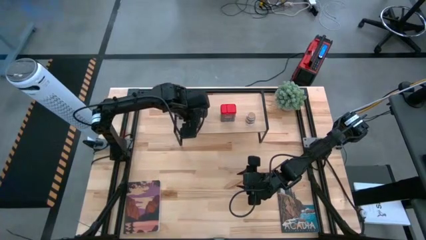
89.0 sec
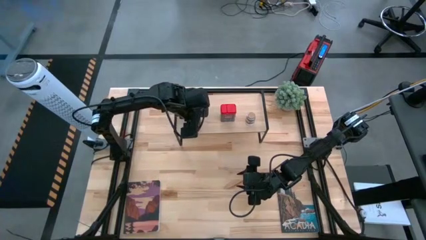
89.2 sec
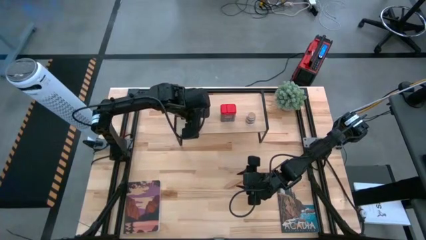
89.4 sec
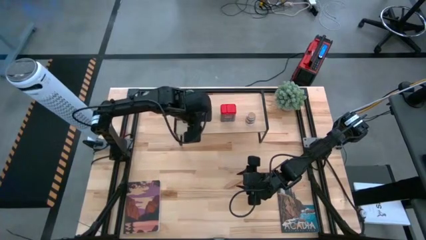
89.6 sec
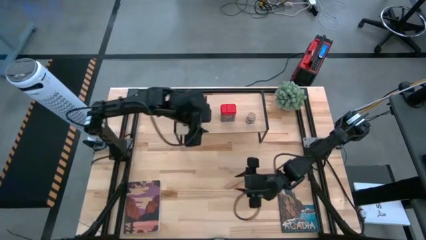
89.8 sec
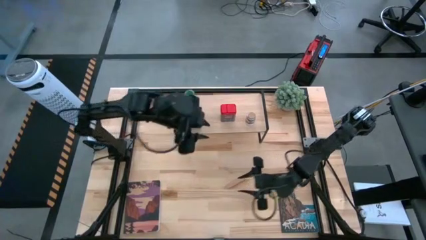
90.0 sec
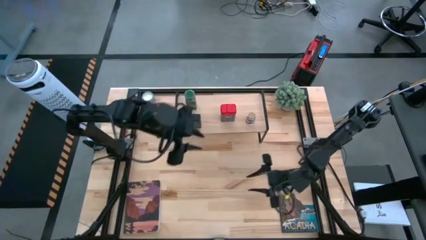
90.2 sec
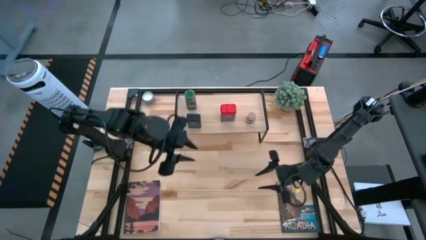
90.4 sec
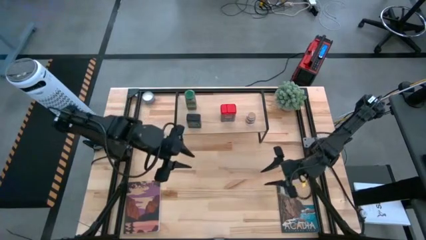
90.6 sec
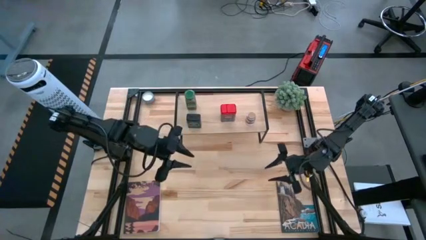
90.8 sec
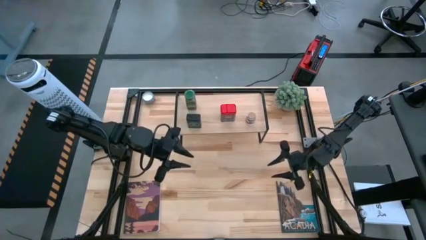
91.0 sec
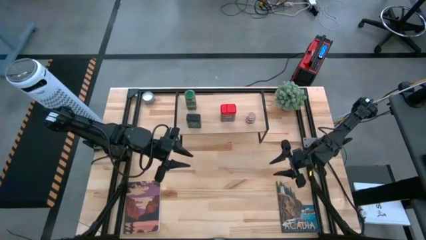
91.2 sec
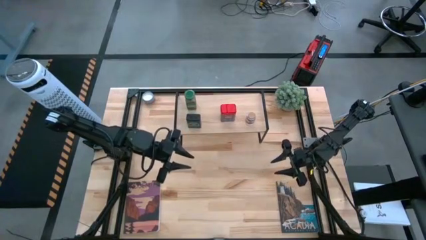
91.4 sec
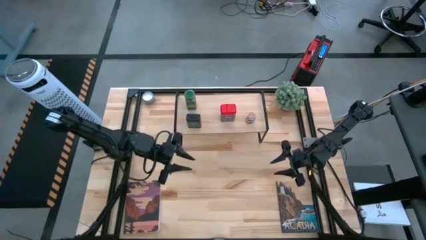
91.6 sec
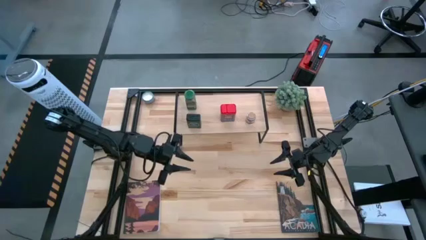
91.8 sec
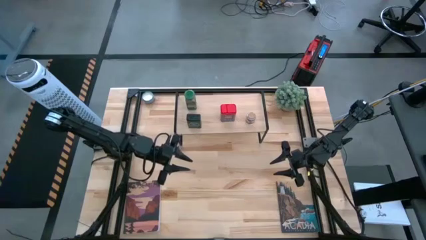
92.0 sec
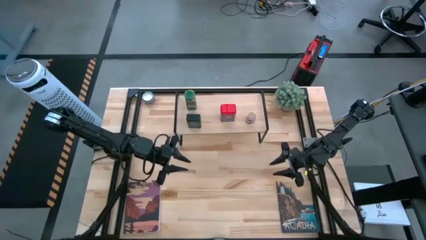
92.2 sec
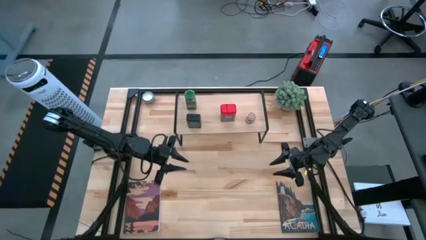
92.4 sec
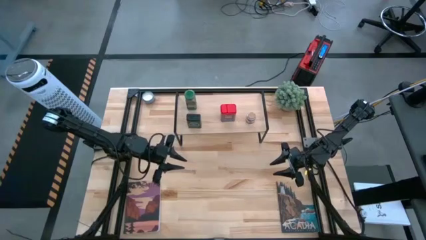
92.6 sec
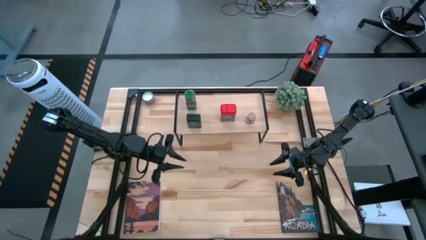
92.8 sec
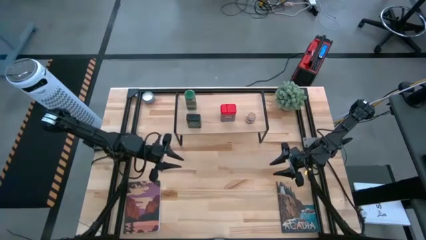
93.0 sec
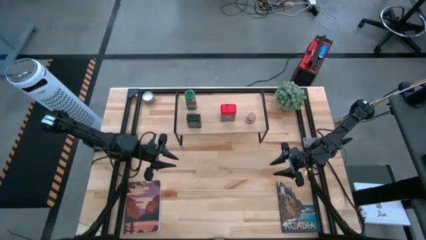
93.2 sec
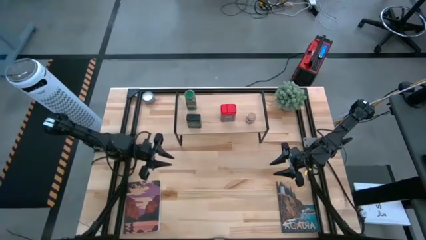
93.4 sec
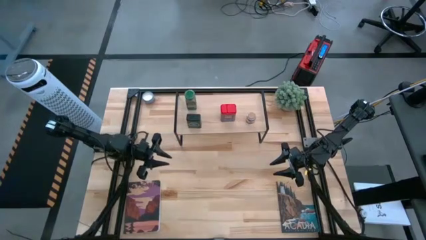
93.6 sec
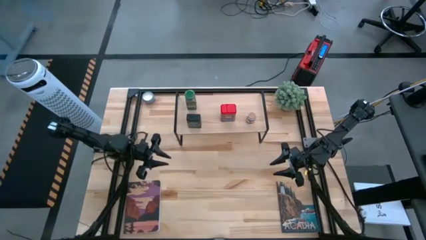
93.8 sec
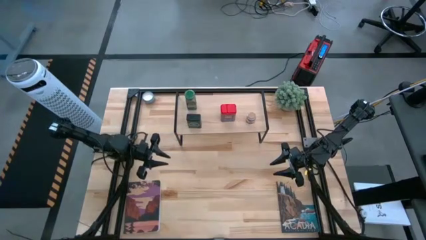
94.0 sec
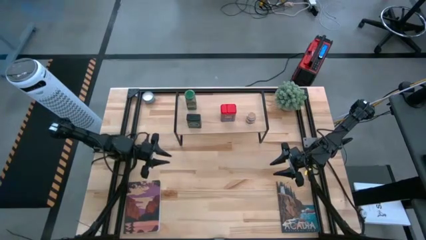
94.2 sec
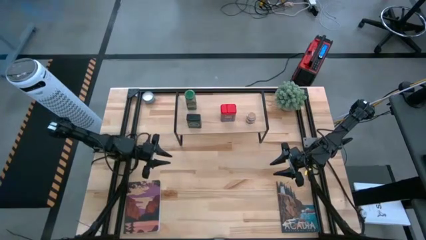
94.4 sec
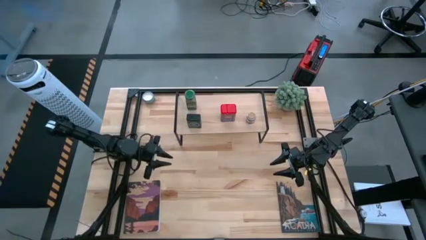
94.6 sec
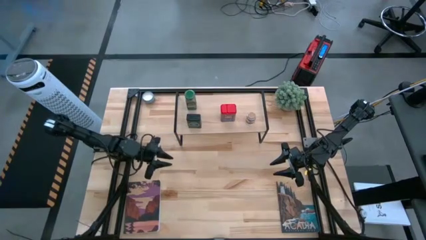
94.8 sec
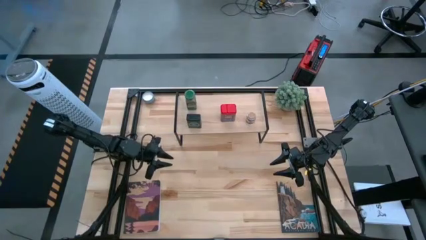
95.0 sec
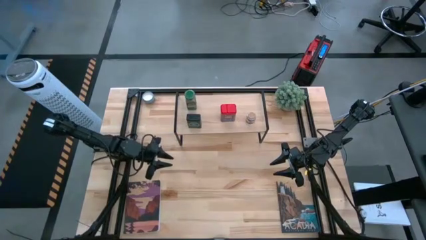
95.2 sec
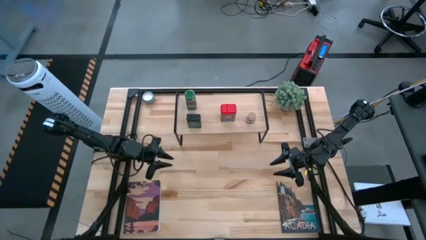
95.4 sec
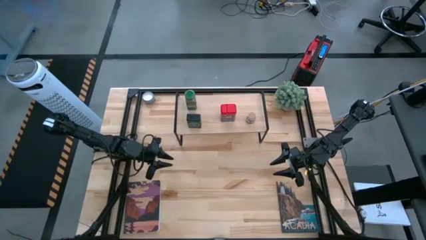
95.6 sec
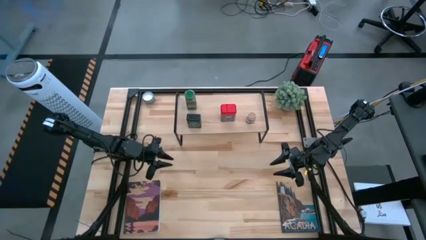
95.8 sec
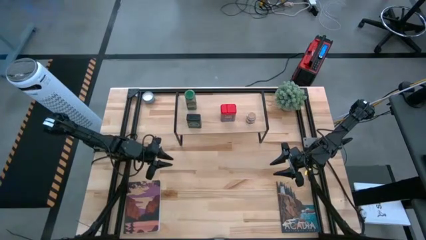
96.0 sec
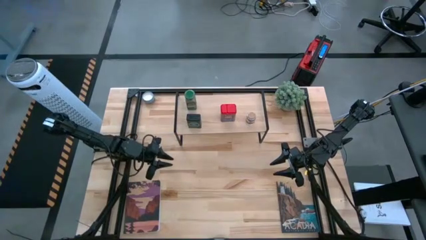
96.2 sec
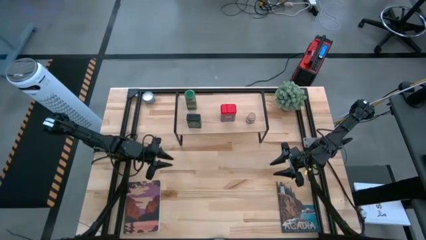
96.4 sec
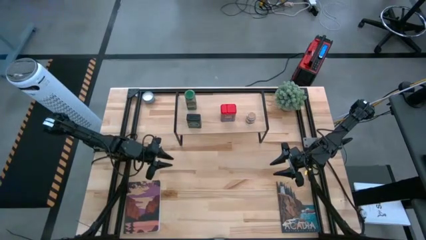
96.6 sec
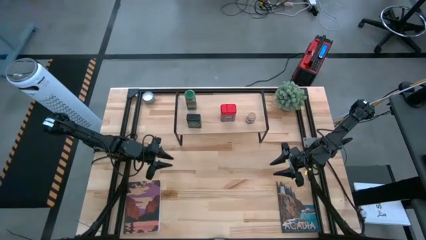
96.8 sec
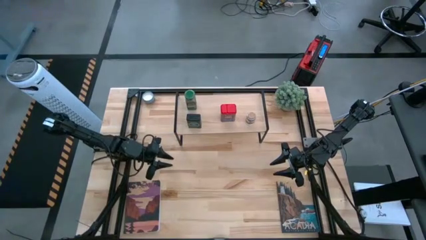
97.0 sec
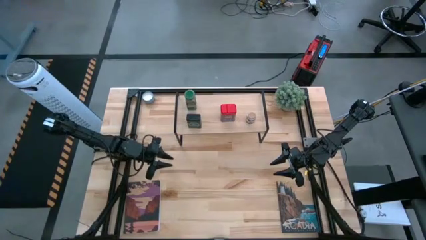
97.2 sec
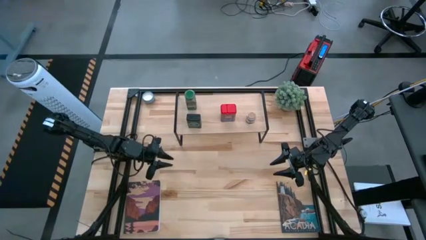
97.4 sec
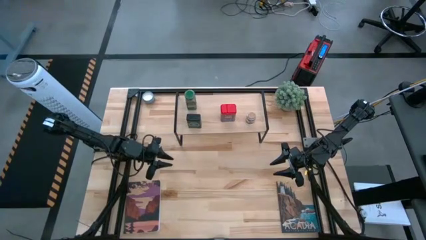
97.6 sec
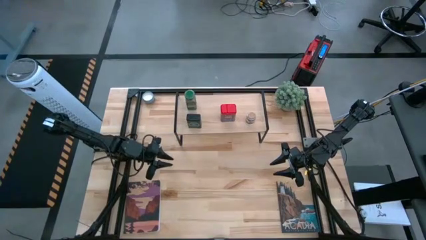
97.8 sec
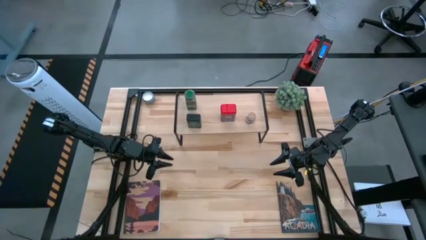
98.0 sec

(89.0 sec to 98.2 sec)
Task: Shelf spices
Return to Home Position

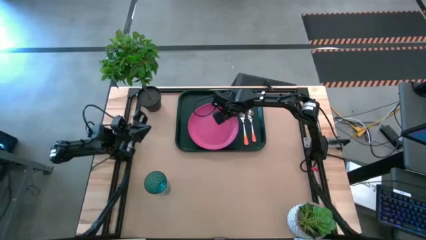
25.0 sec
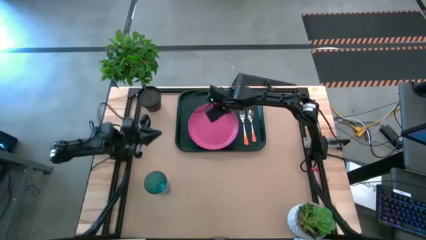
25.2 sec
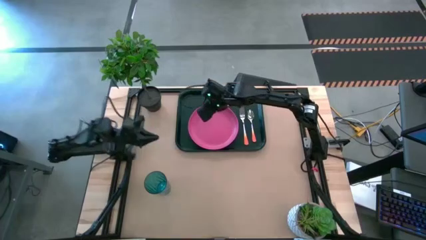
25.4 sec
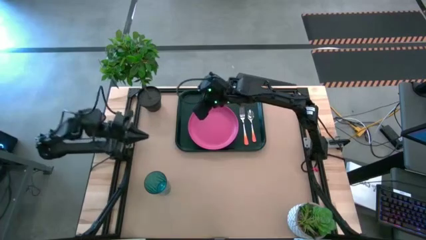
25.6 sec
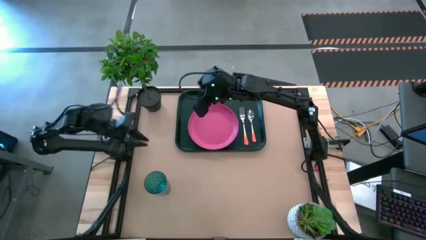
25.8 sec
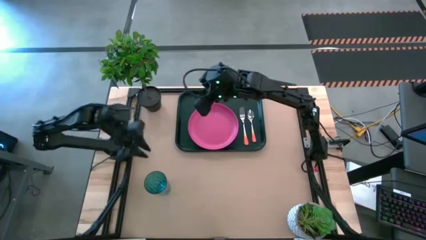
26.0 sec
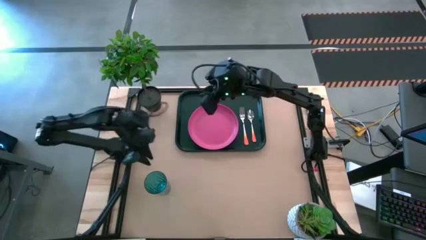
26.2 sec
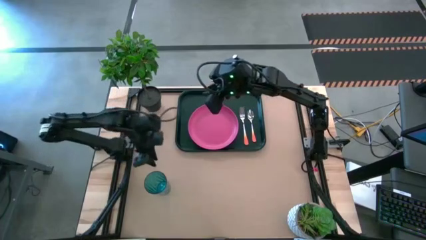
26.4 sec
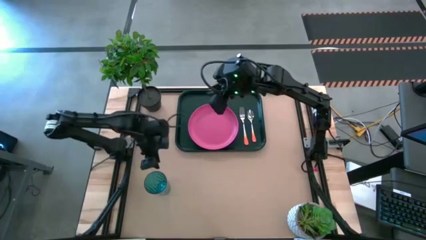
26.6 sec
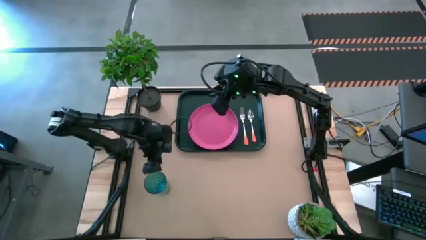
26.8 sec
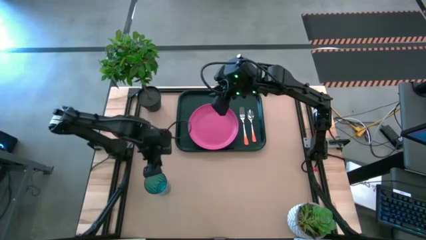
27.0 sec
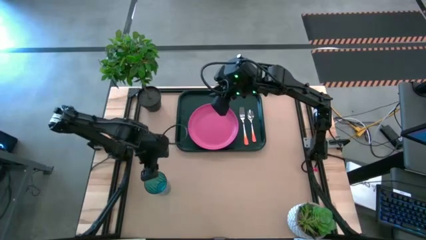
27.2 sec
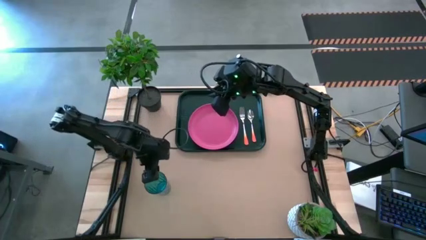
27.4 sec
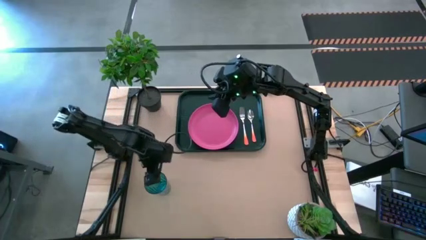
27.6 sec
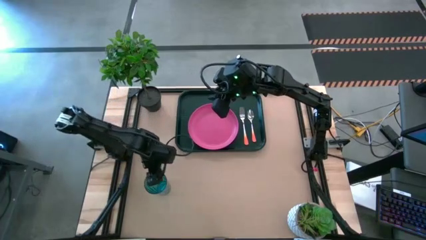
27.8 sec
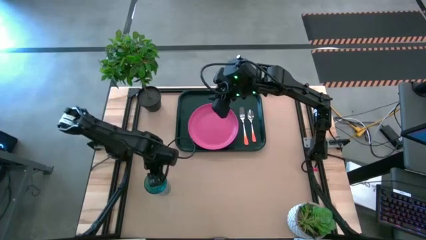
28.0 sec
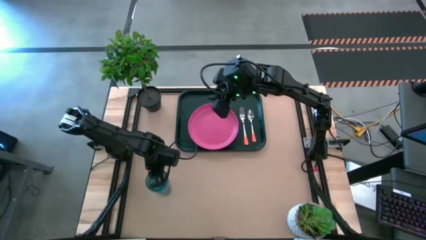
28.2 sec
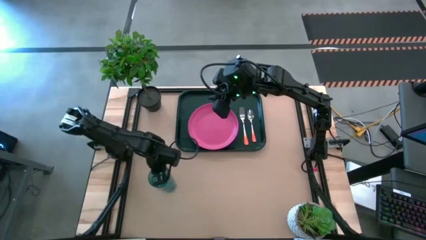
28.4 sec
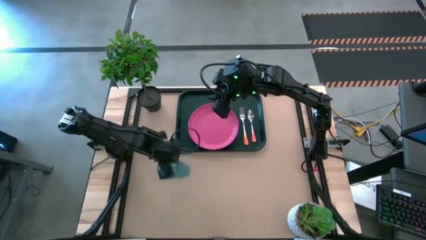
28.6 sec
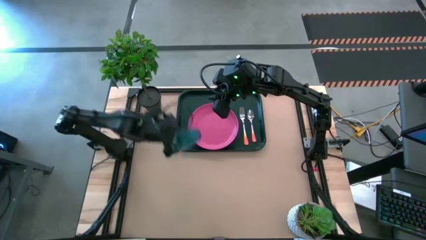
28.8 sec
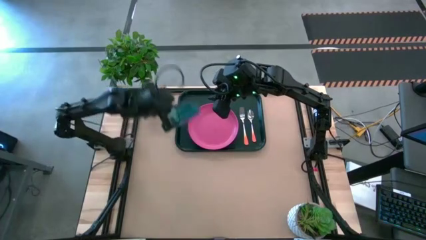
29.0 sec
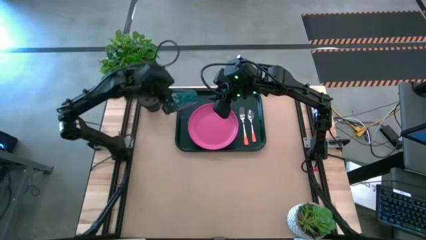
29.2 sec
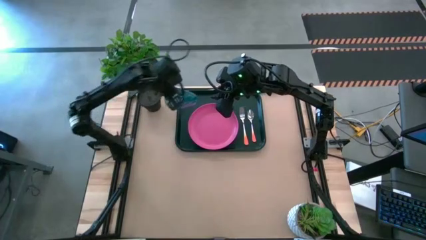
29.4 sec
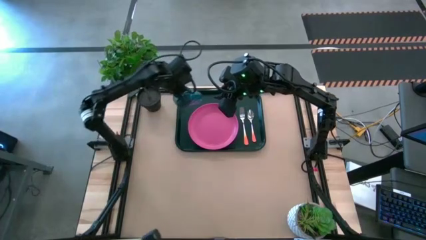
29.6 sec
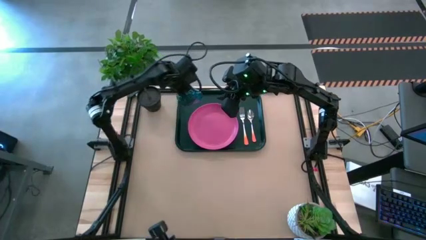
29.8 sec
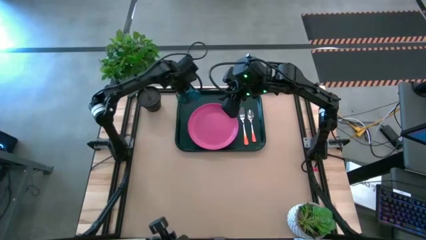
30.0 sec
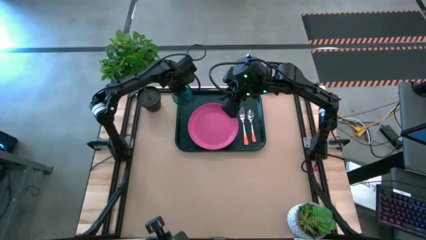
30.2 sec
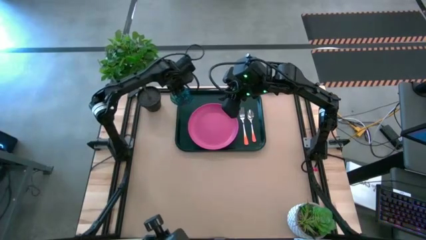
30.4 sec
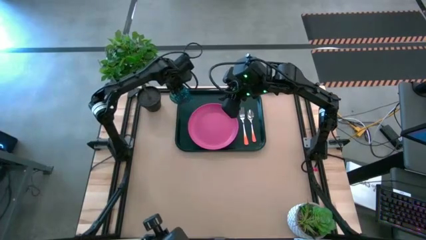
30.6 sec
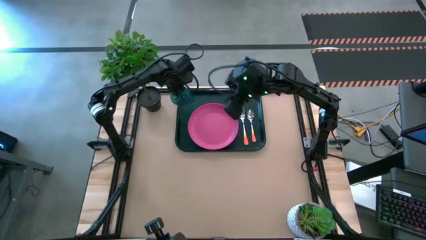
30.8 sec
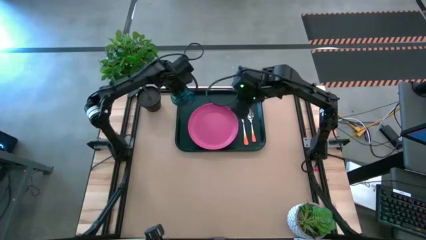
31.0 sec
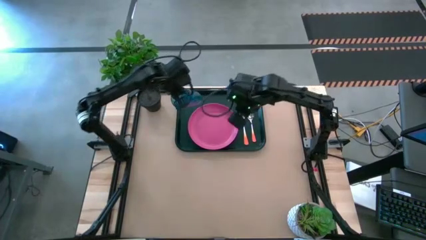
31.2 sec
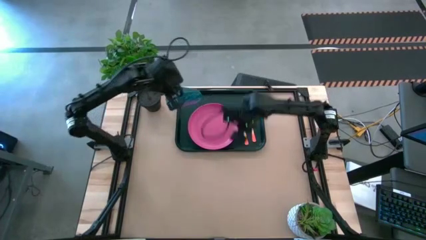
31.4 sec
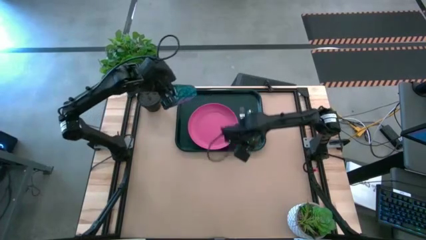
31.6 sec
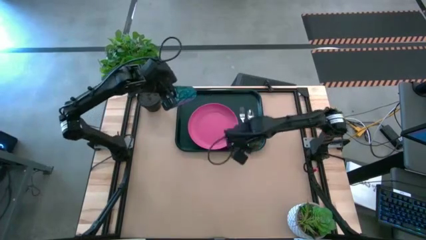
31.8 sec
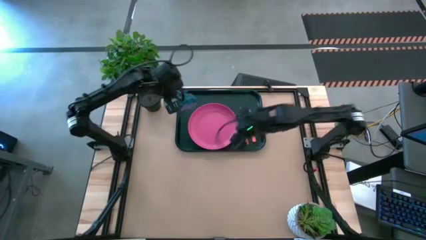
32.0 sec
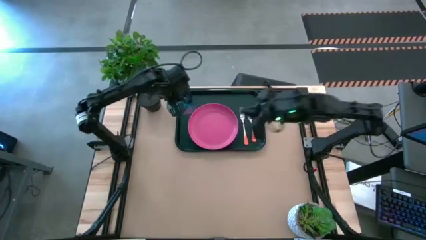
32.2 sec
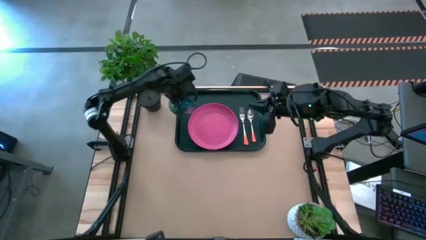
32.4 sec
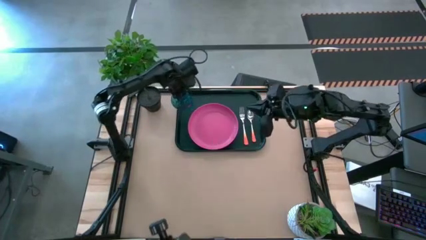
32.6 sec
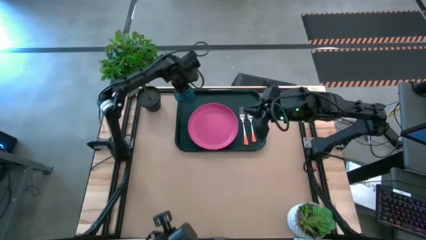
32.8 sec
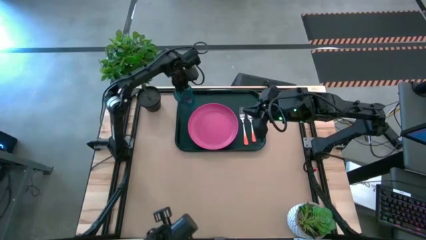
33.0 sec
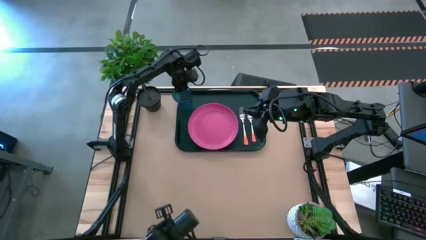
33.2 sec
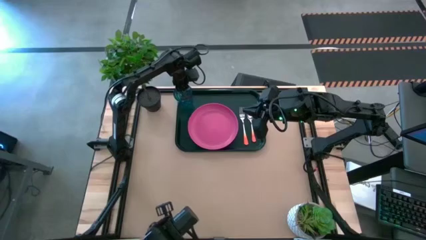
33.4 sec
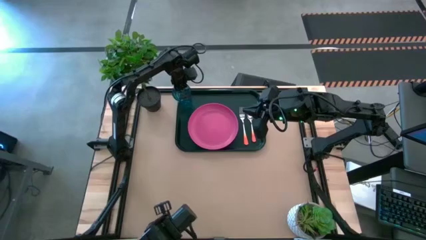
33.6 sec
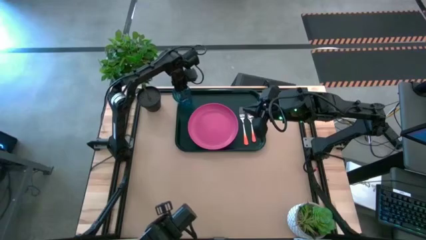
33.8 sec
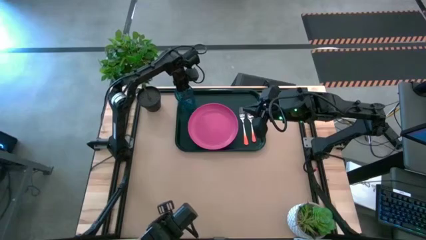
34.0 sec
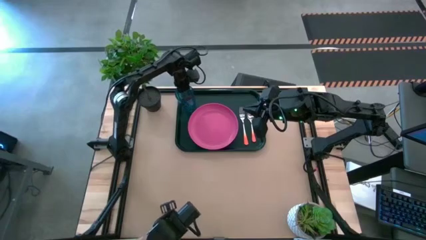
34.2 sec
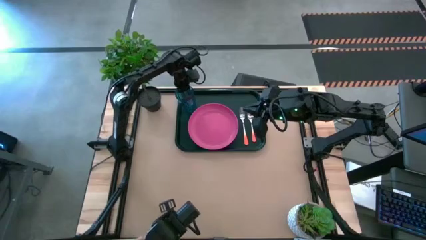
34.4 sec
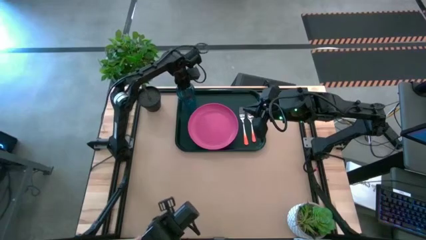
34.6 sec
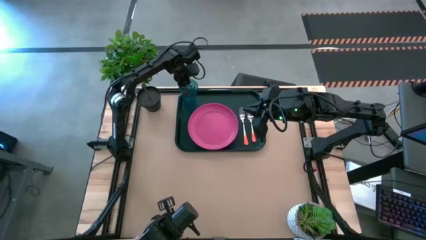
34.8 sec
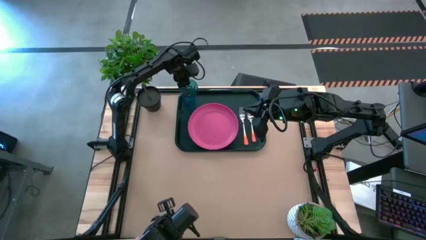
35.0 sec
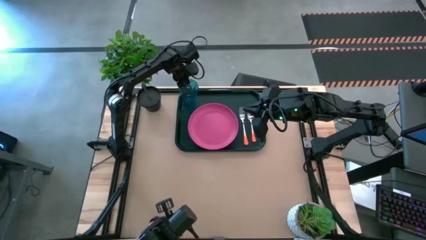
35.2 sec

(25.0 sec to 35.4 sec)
Task: Pick and place plate/cup/fork/spoon on tray
Put the blue glass on the green tray on top of the pink plate
